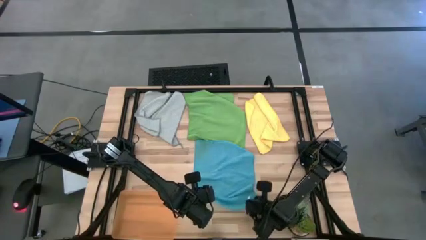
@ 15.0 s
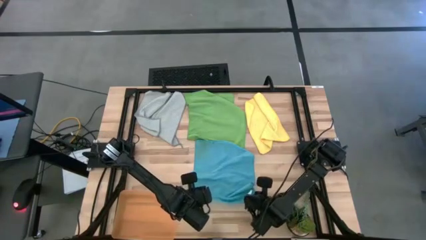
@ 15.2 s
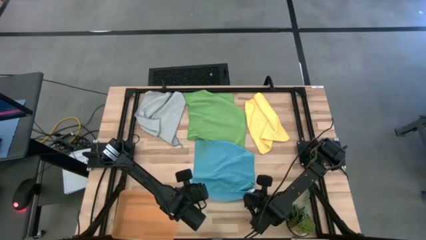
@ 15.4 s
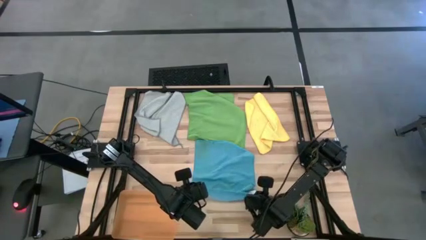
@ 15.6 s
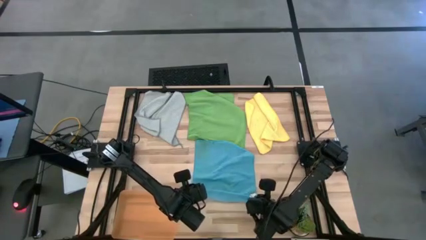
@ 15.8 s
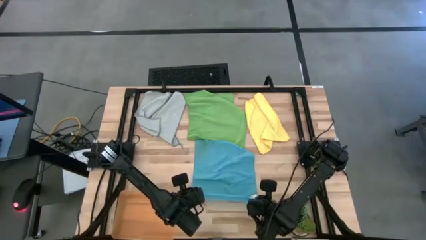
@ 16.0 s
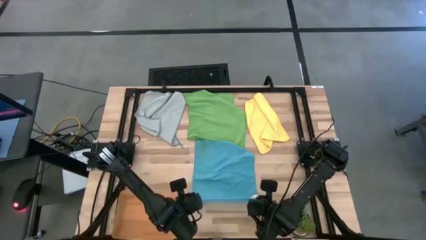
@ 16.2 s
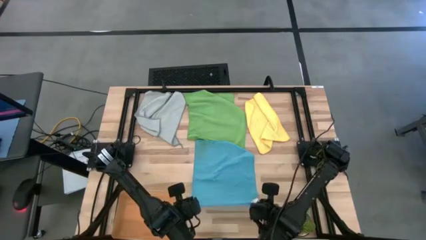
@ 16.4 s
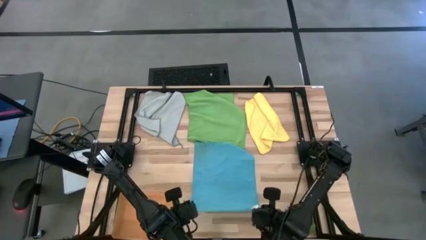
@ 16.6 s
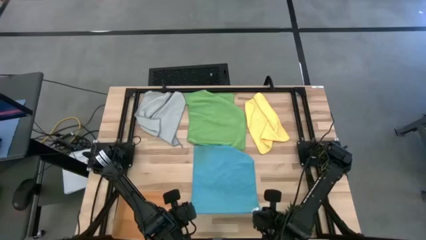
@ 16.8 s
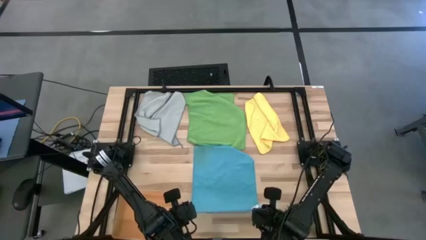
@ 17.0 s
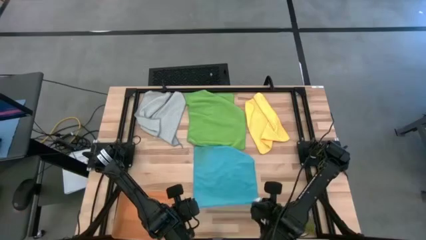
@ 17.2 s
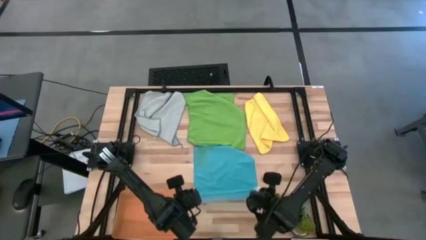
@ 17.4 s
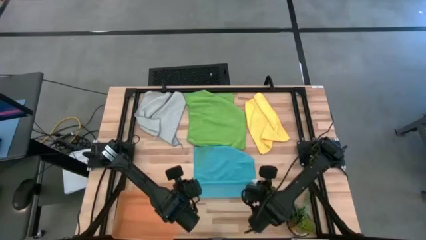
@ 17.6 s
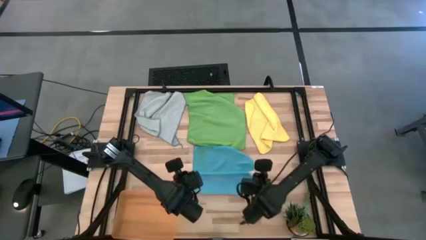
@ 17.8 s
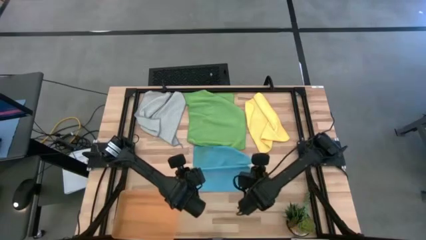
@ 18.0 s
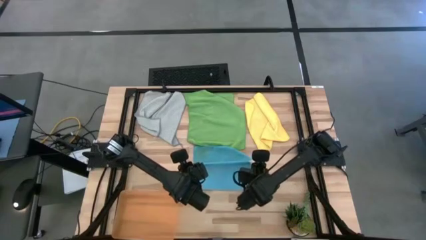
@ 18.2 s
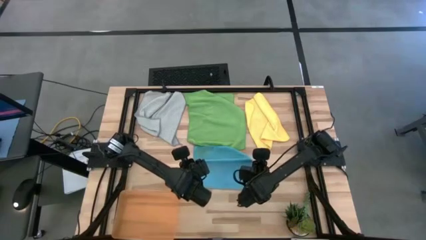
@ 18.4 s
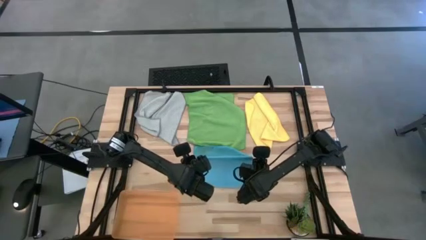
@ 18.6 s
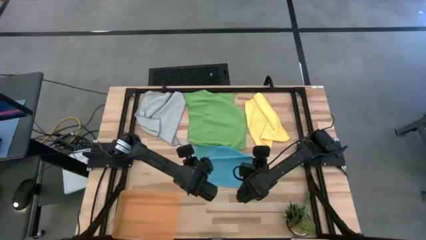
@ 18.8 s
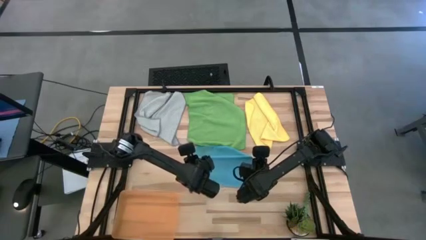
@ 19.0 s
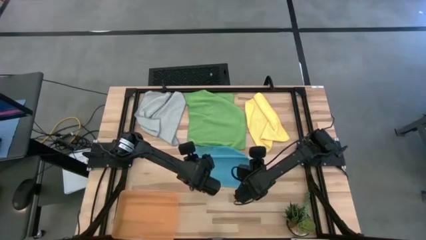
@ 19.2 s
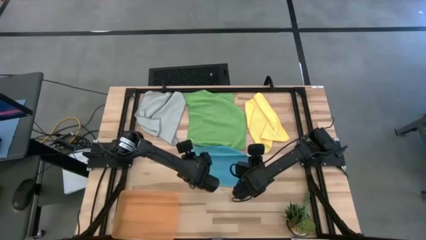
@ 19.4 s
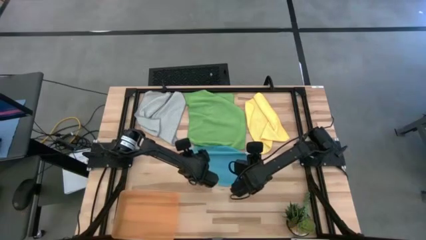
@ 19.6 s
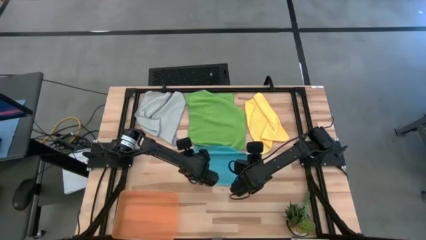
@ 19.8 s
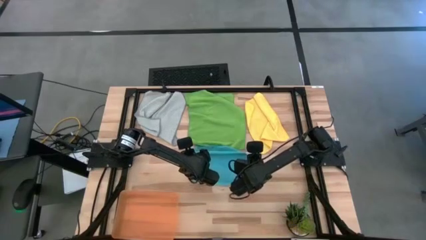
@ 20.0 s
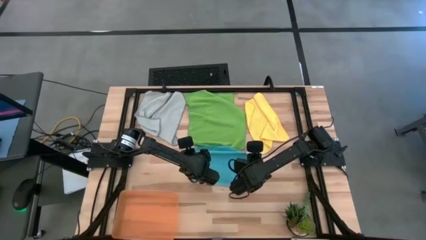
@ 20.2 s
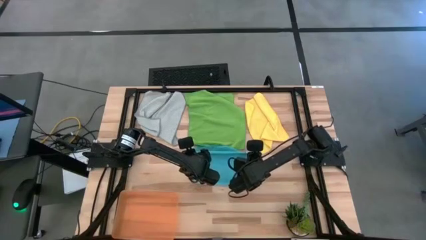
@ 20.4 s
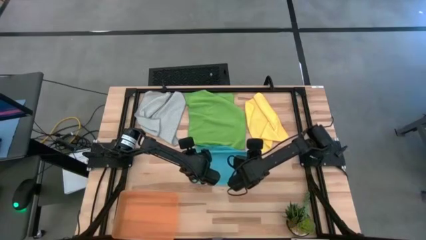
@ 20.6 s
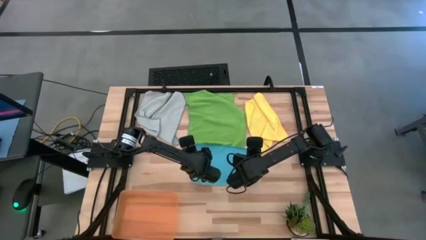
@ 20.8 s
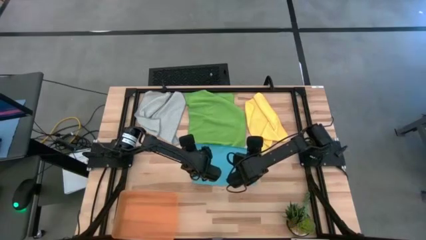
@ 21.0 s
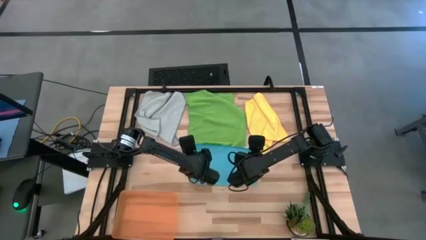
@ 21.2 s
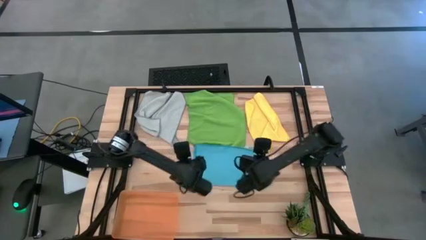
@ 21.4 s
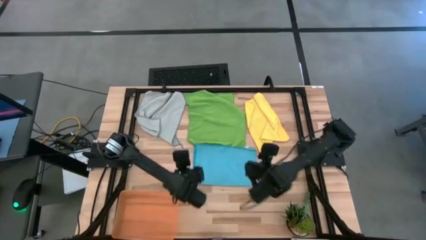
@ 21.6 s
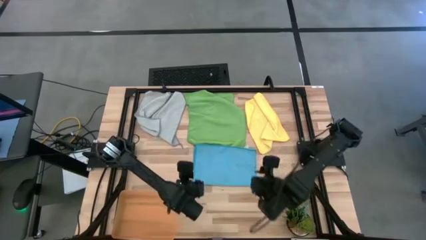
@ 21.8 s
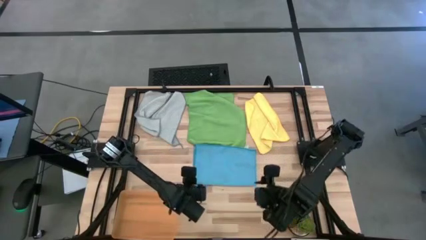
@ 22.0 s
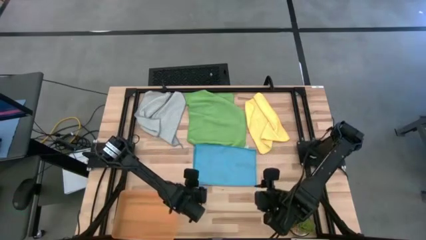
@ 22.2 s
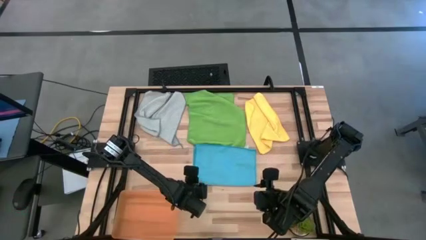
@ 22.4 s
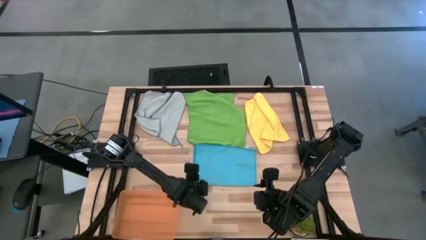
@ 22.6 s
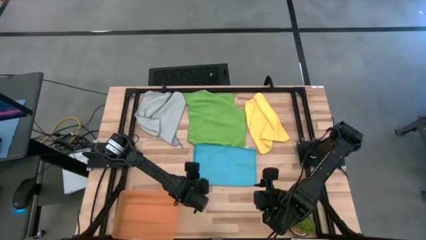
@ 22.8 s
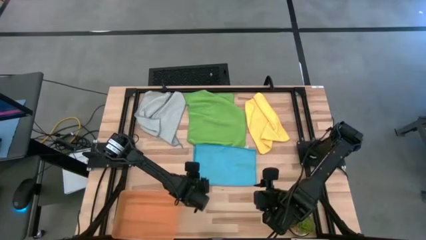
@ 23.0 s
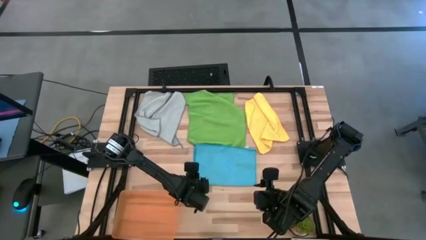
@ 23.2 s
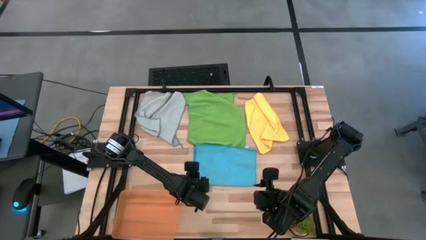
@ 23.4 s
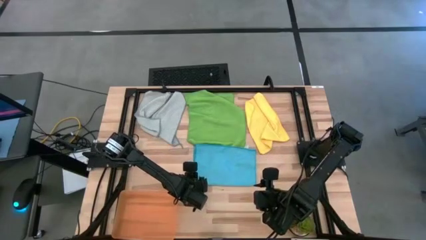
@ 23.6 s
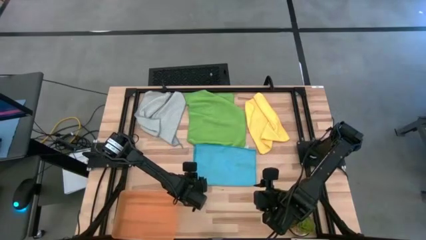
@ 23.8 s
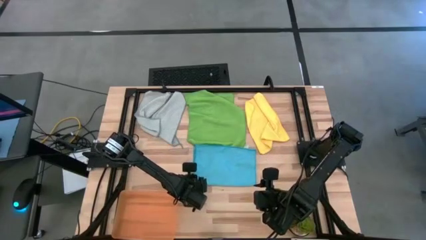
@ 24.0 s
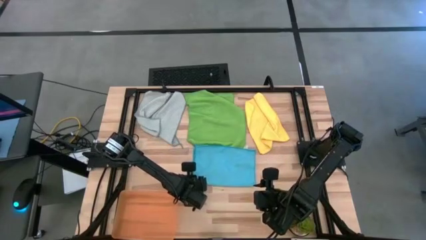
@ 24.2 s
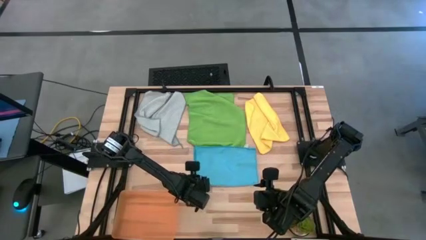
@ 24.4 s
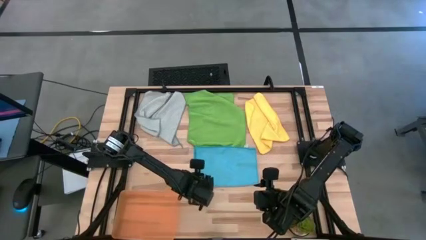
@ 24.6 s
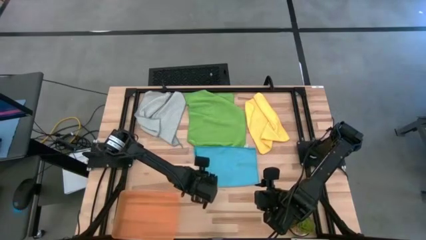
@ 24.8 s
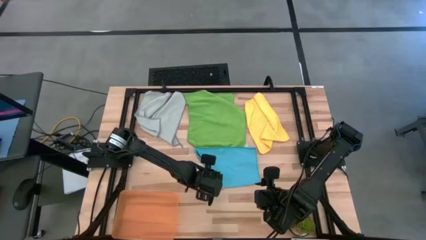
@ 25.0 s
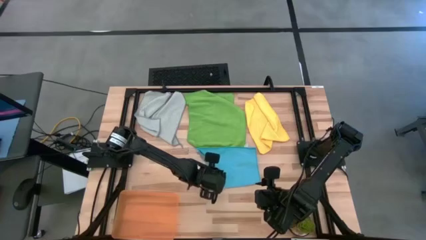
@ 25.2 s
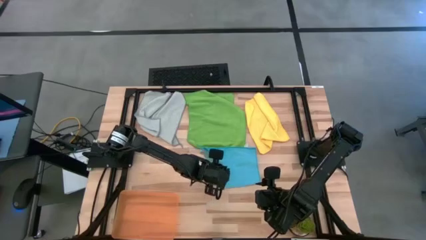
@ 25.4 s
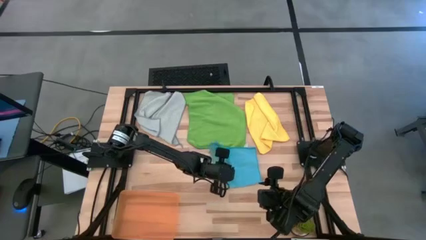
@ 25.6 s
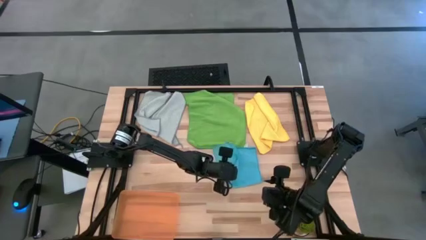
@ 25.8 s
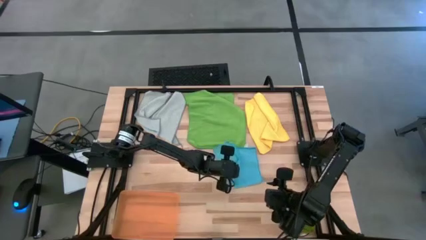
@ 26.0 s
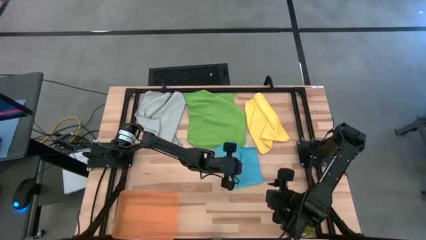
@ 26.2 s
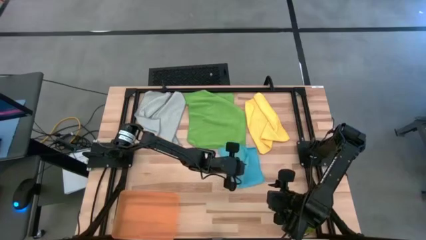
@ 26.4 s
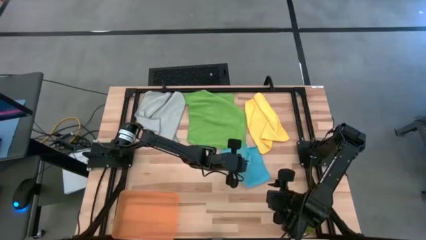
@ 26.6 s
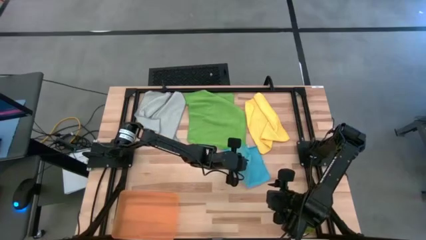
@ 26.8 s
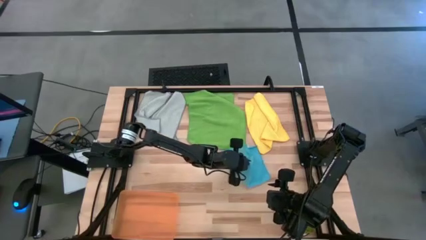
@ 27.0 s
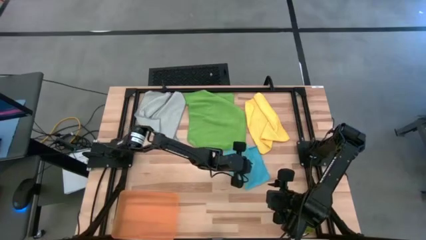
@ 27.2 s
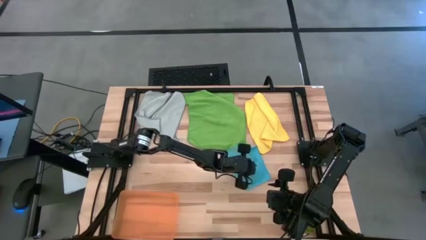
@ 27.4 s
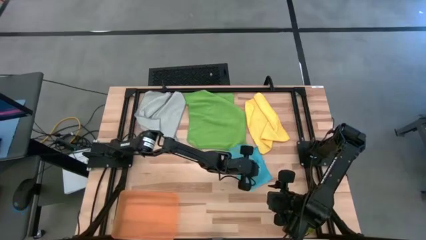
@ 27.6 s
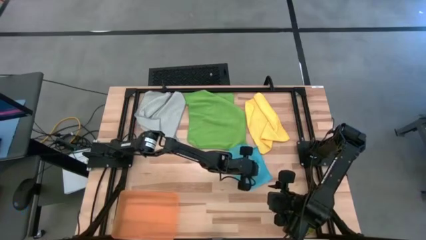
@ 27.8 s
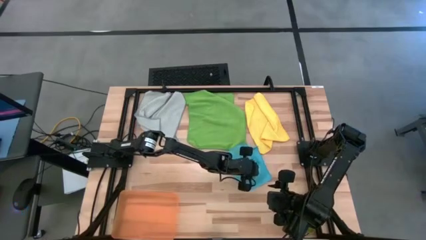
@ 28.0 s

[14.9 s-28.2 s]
Task: Fold microfiber towels
Fold the blue microfiber towel

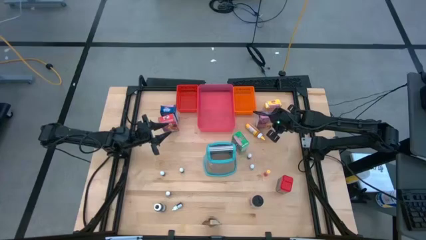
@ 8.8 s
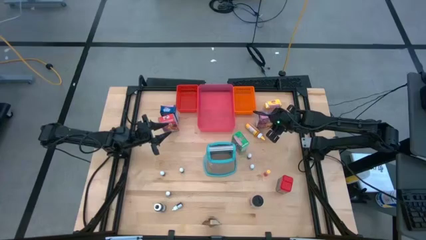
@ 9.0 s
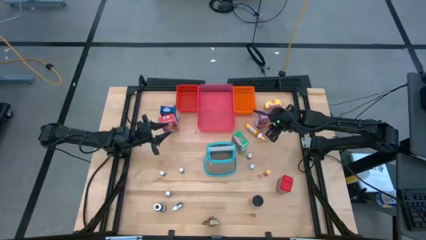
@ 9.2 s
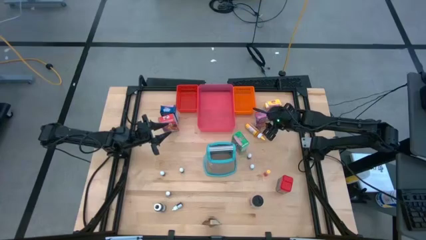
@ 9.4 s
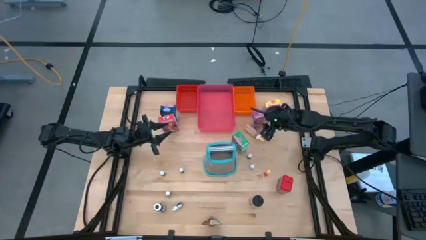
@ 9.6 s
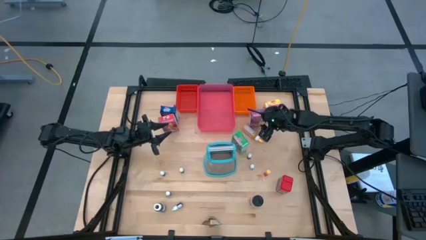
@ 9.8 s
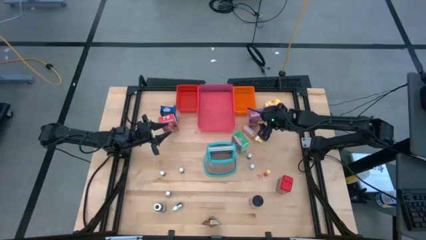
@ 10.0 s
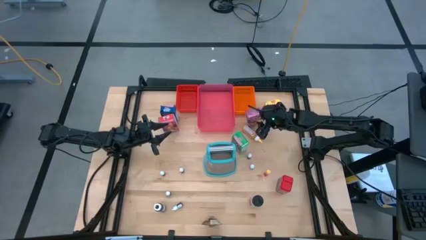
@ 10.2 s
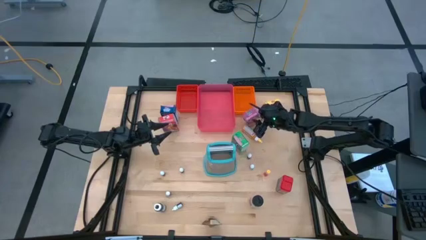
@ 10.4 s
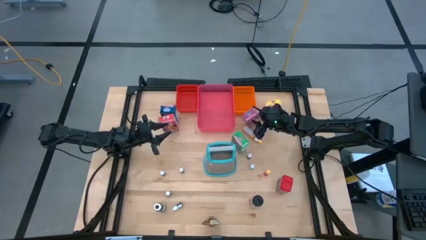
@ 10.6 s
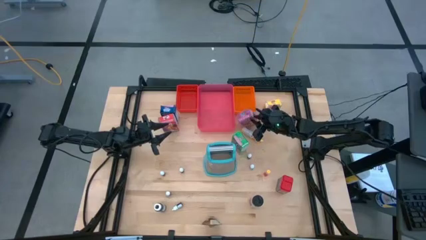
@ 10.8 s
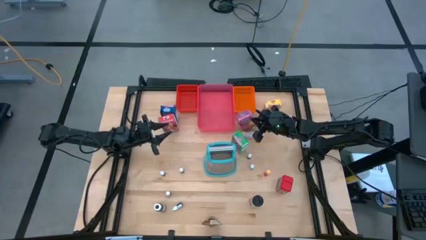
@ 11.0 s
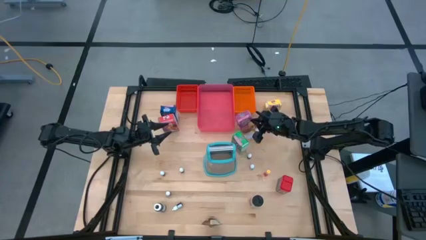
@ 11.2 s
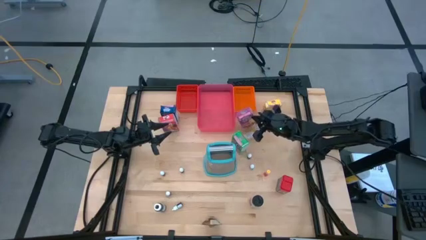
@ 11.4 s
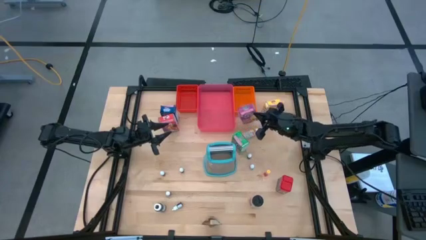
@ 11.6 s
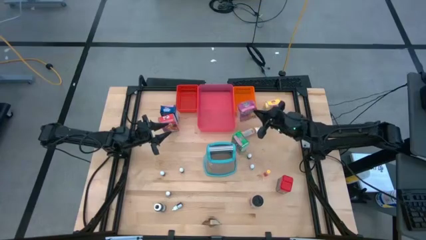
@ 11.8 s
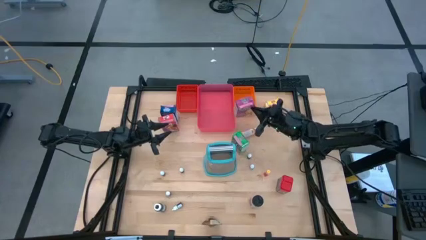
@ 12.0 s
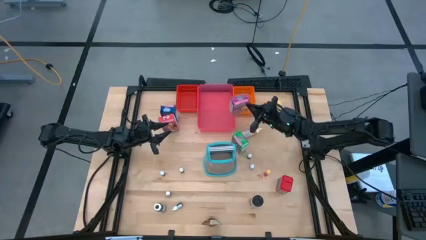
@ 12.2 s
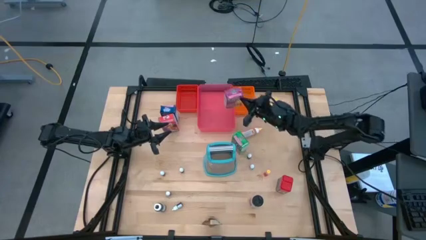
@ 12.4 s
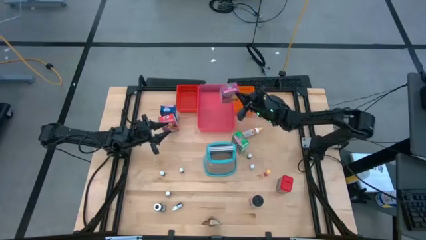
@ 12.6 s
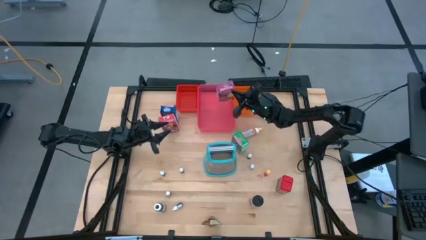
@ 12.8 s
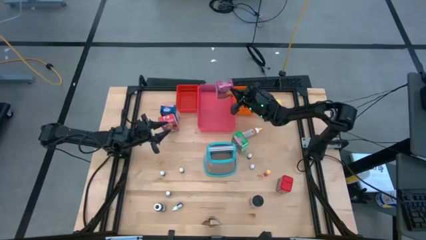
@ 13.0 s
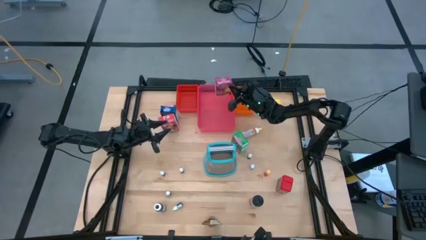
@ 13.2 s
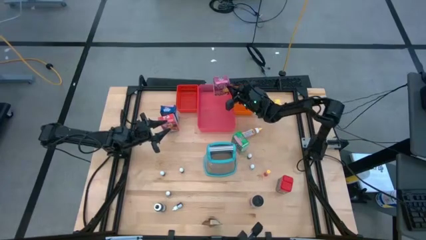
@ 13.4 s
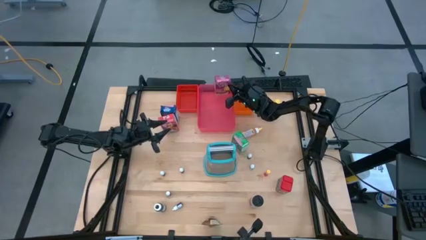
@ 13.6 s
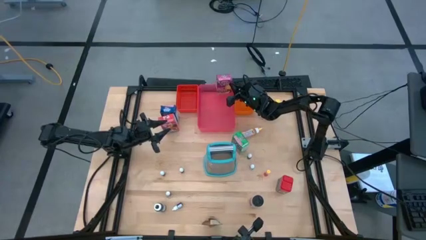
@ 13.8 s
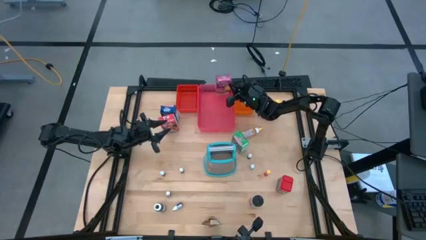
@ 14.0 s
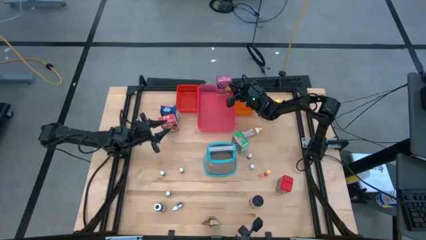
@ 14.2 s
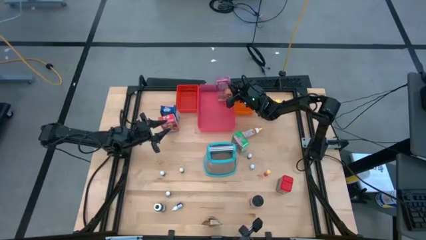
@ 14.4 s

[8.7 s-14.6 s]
Task: Pick & Place Kitchen Items
Put the purple cereal box into the pink bin
